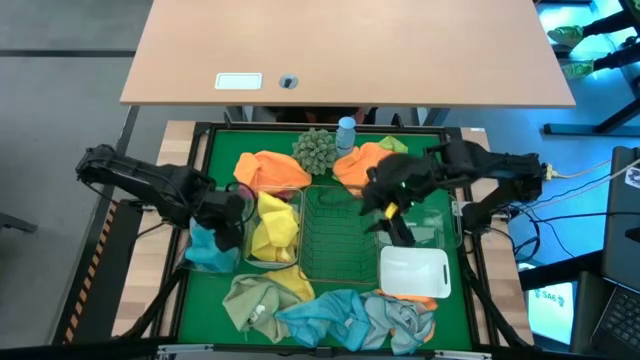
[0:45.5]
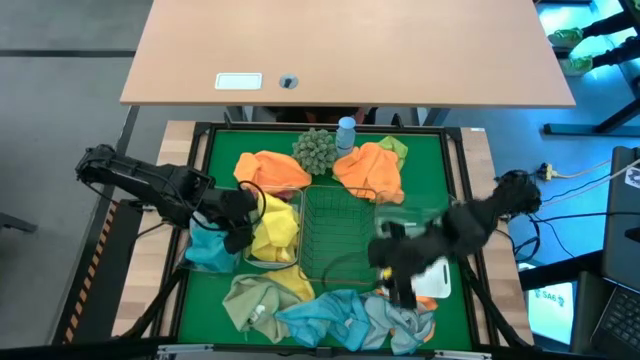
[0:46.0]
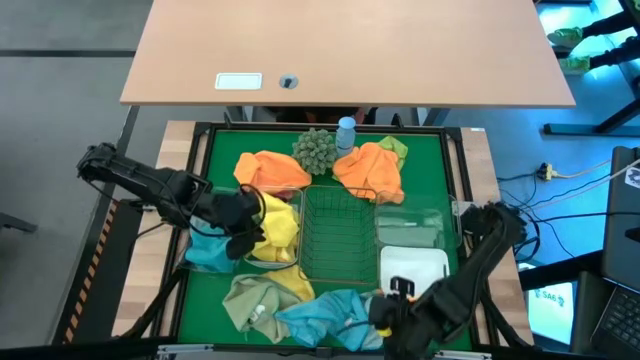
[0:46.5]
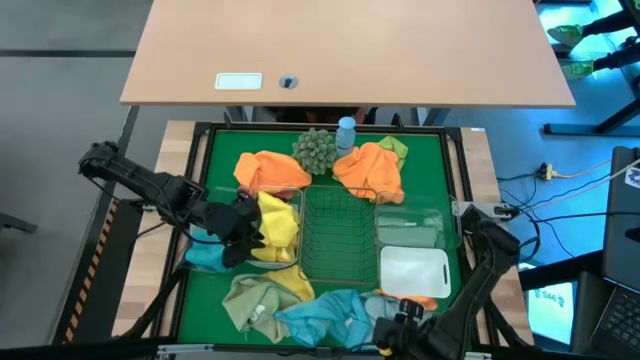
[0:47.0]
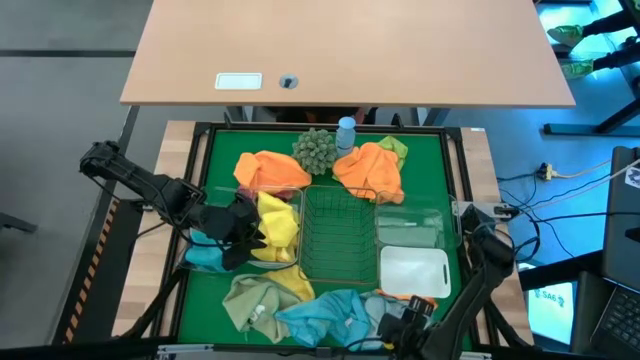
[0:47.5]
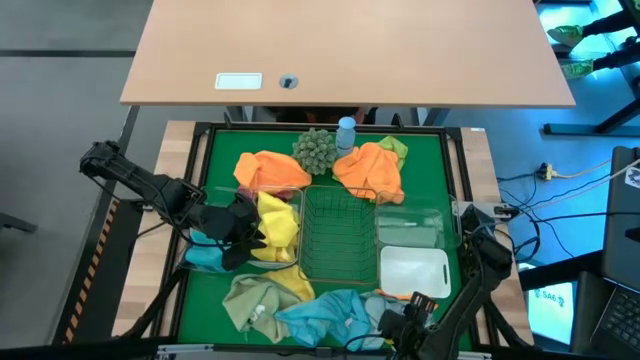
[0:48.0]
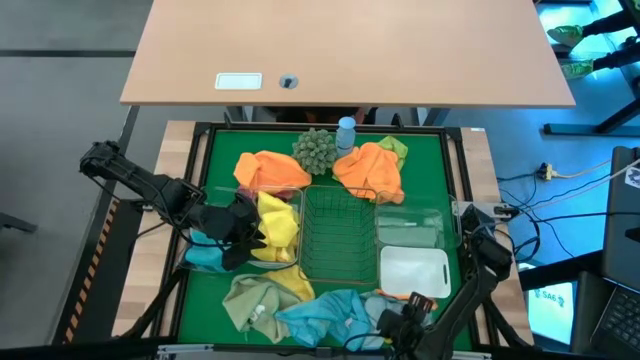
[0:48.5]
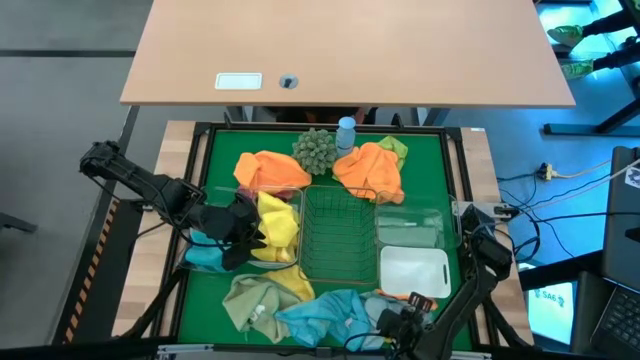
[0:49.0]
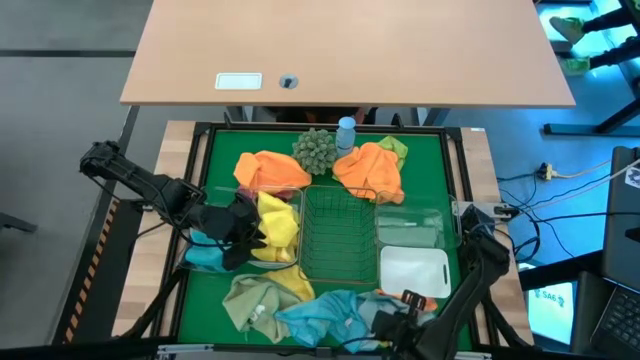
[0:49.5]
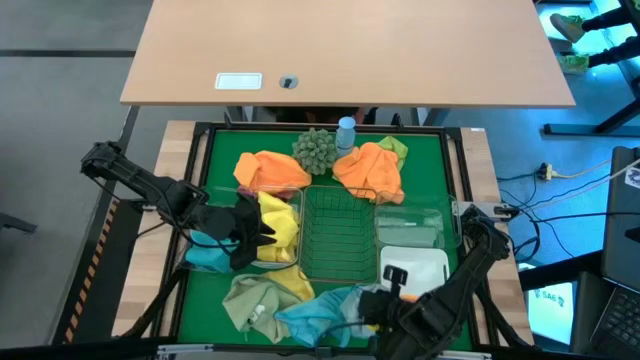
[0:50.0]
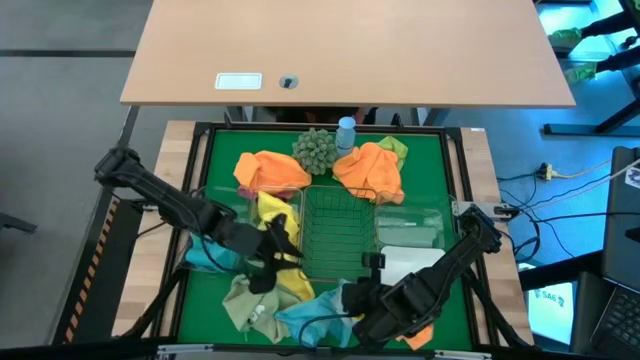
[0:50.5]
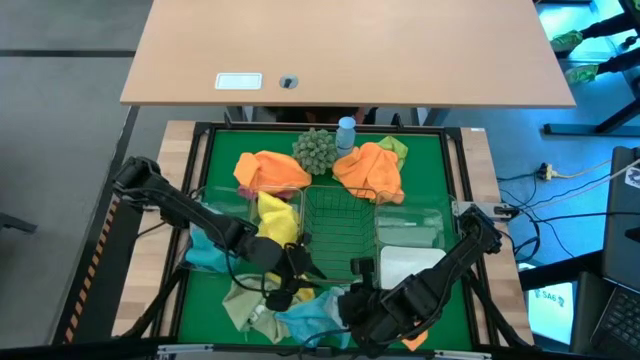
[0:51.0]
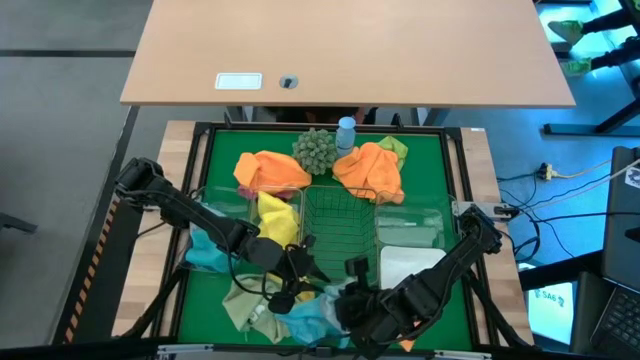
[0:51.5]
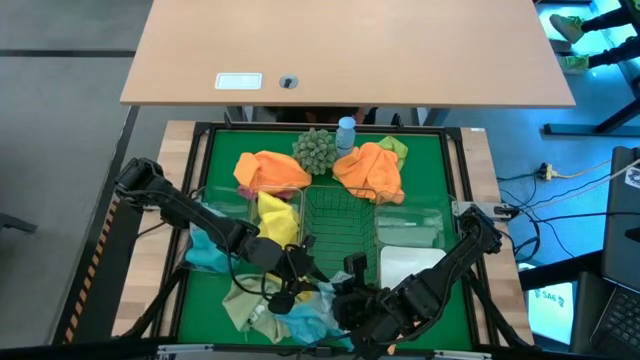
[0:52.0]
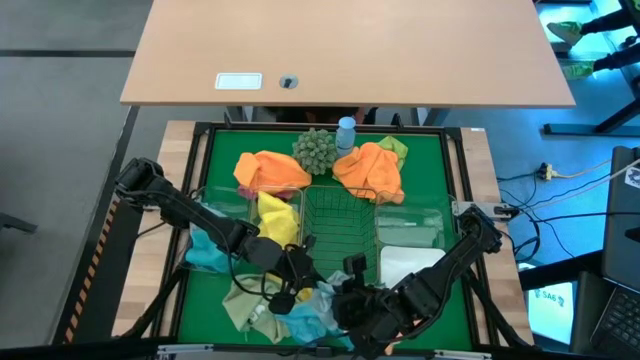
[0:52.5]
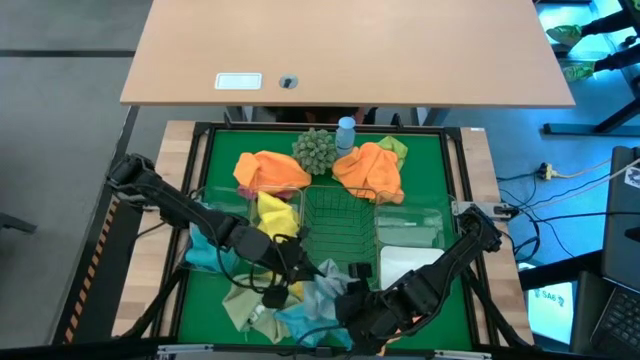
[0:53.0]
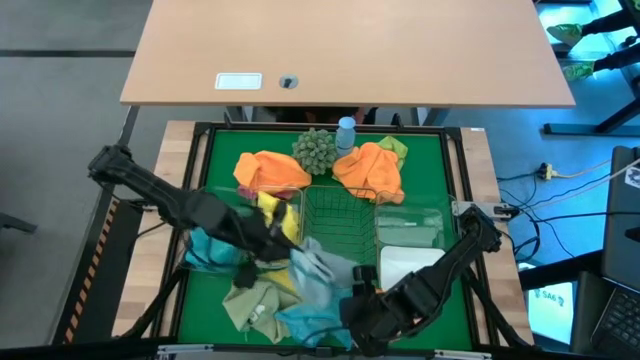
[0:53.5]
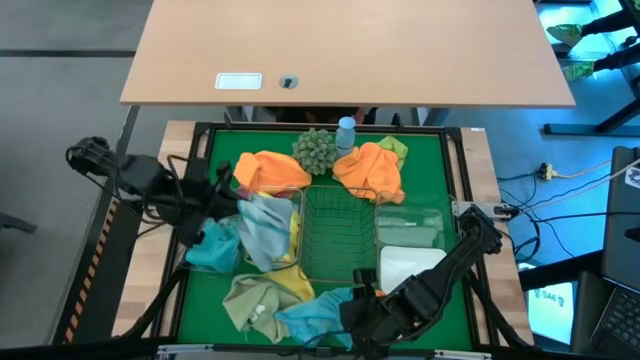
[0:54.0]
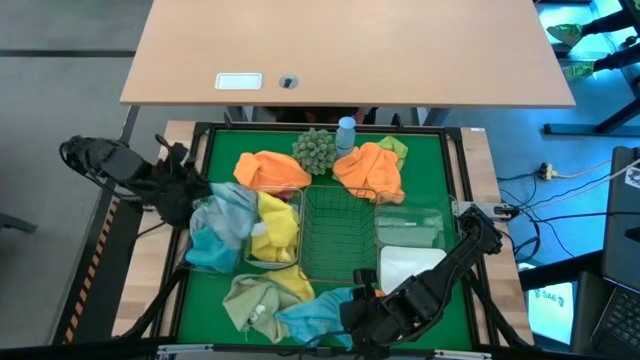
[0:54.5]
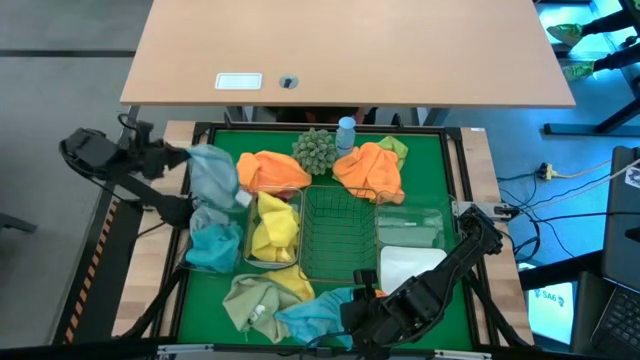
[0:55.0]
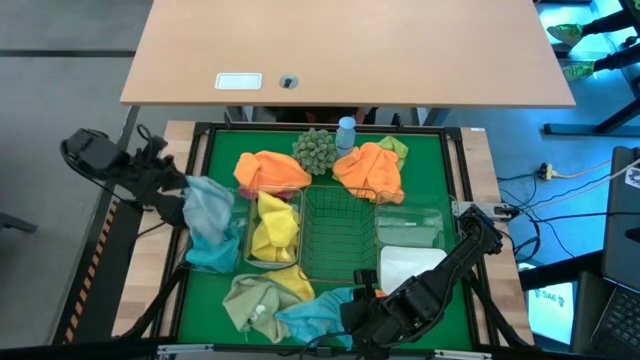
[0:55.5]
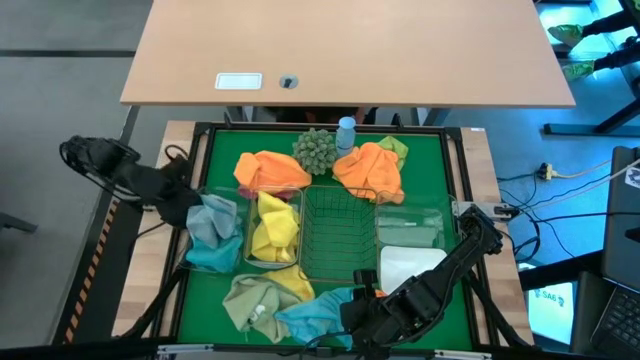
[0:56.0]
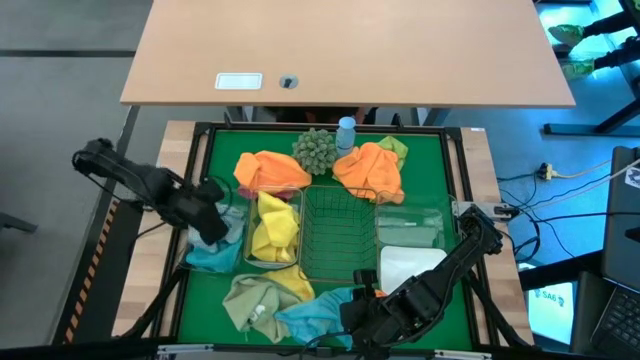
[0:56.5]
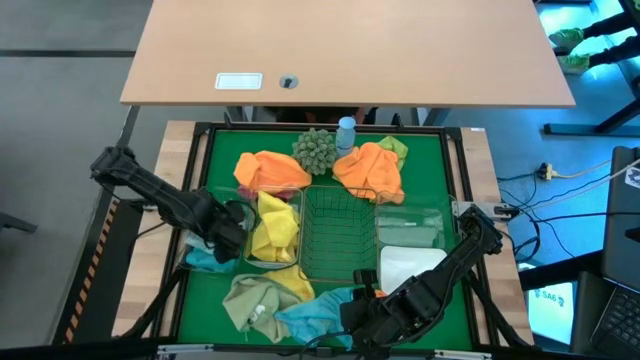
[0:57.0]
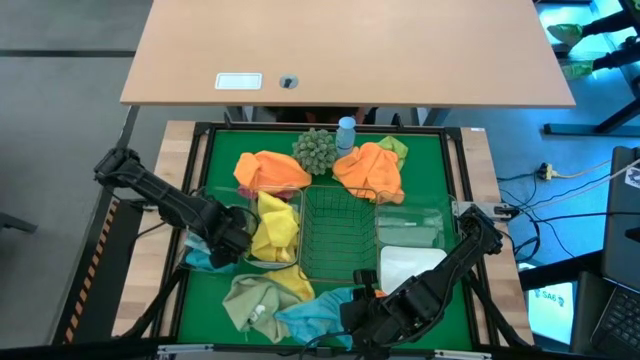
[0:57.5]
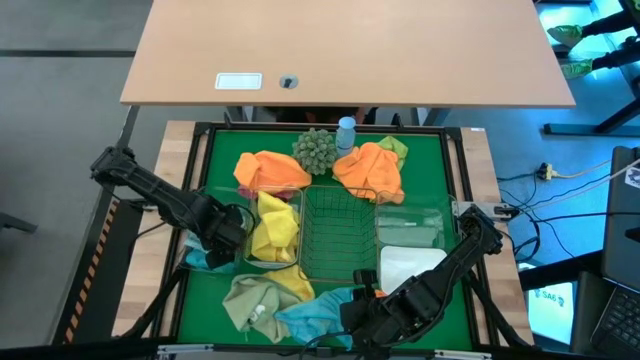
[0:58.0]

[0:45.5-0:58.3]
Task: Sort microfiber towel by color & place in baskets
Put the bottom right light blue microfiber cloth into the left transparent bin

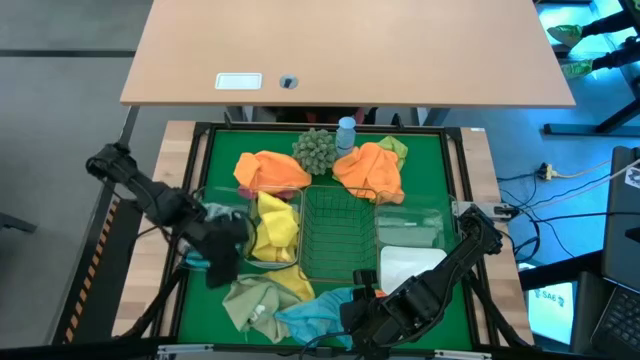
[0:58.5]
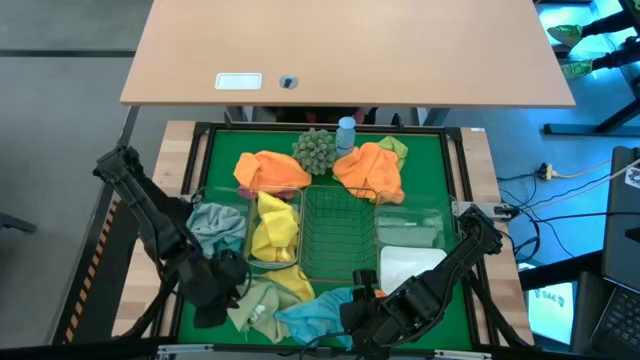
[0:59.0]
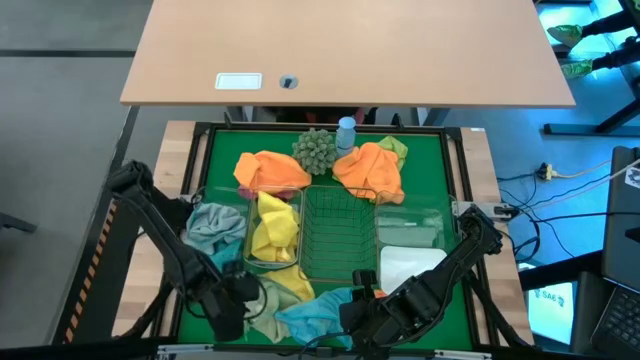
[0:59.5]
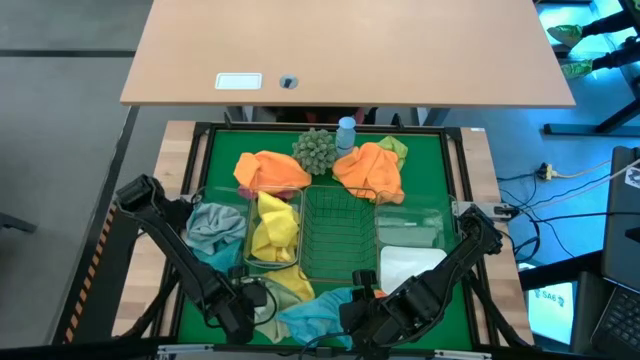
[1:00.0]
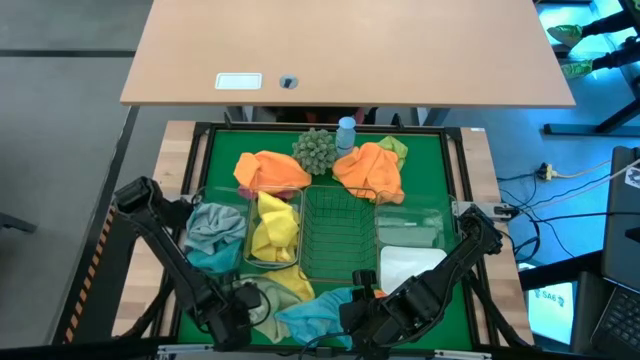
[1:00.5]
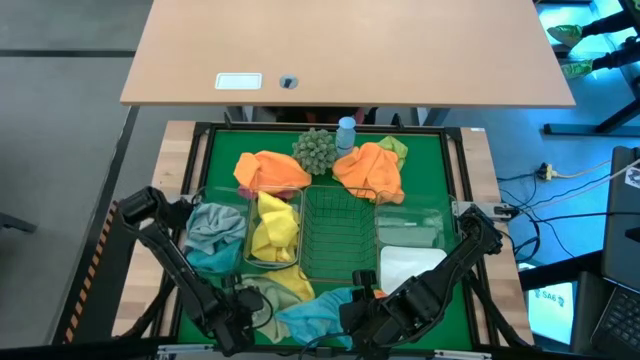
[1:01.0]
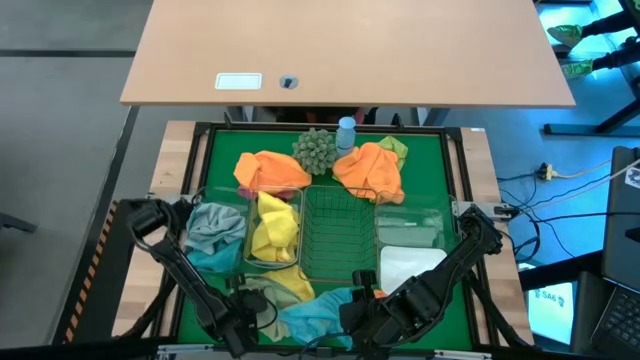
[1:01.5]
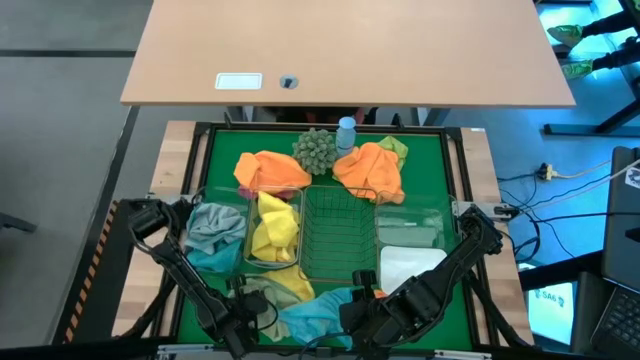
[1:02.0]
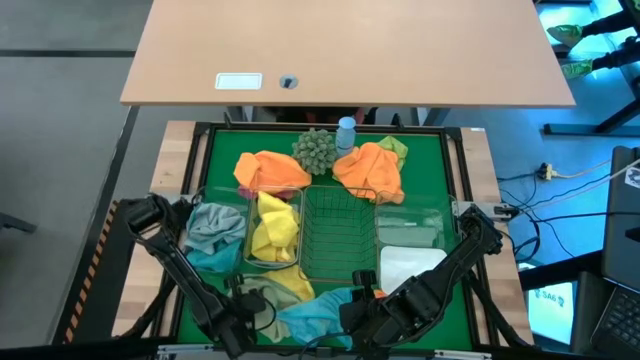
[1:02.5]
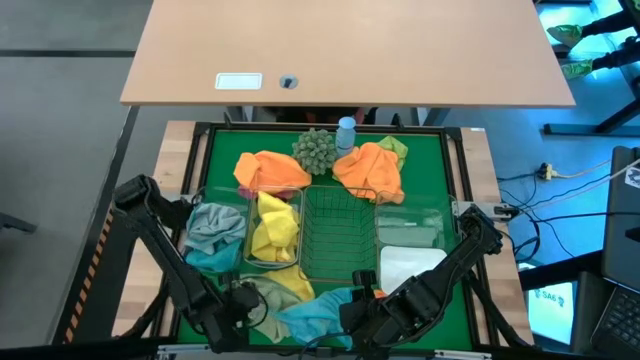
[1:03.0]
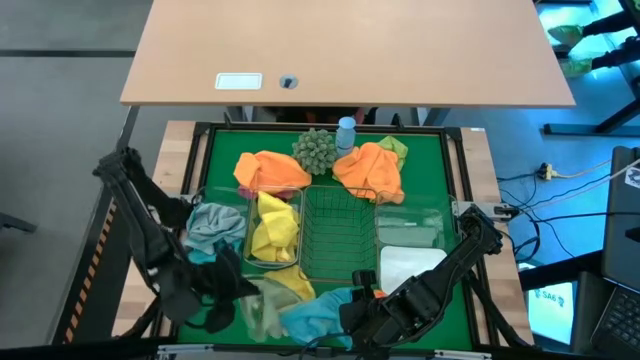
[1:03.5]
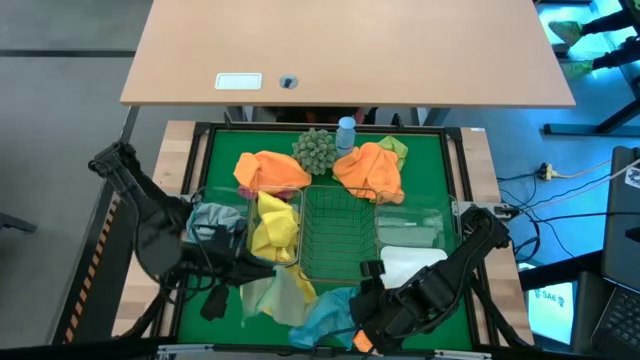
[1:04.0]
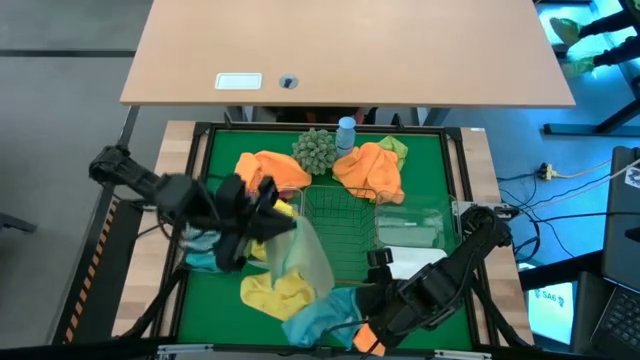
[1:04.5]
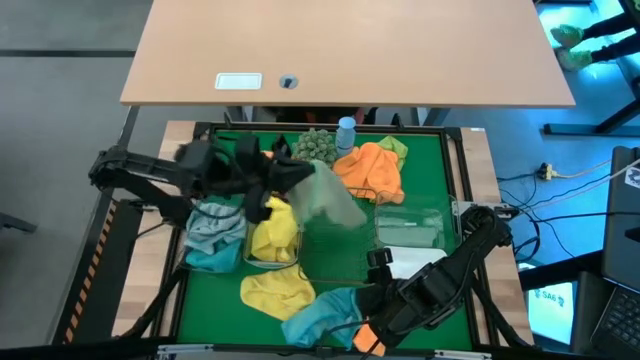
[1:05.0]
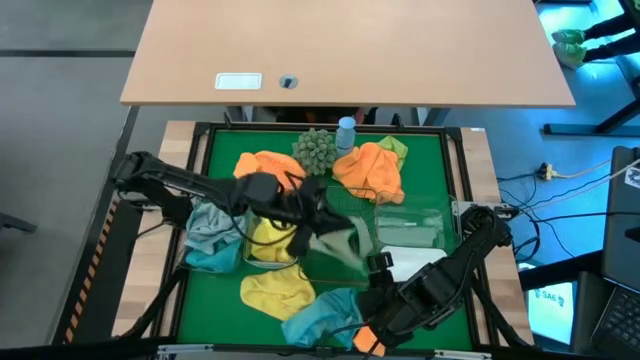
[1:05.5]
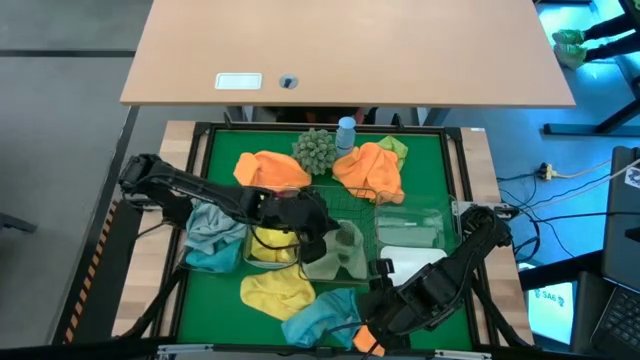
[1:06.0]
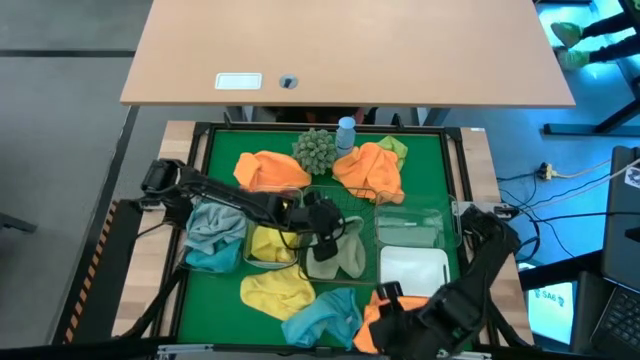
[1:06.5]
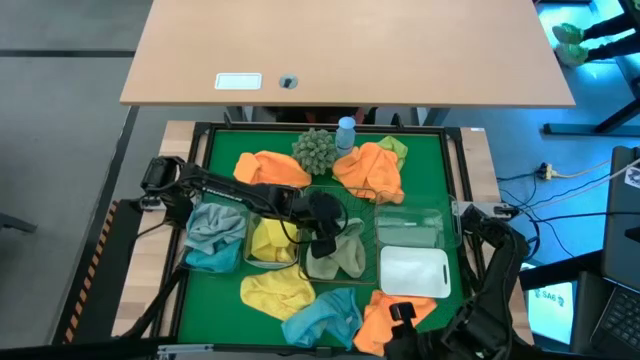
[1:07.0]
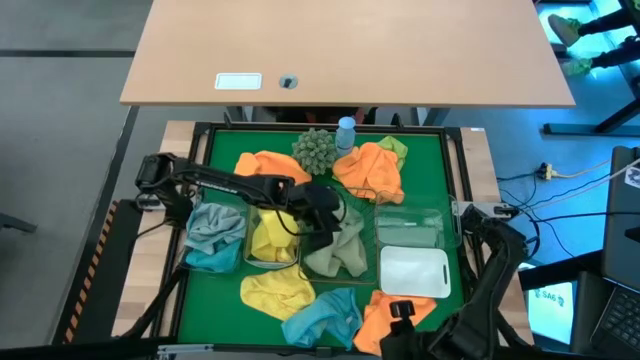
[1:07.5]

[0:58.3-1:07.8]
Put the bottom left green microfiber cloth into the black wire basket
